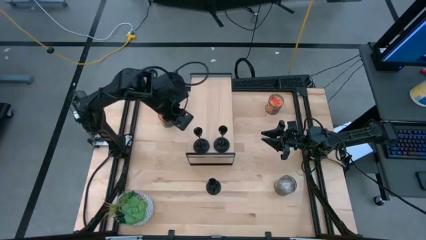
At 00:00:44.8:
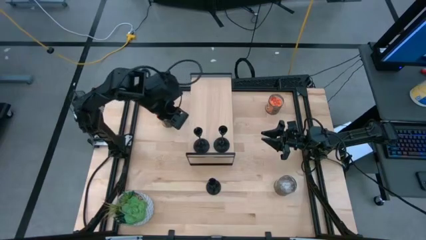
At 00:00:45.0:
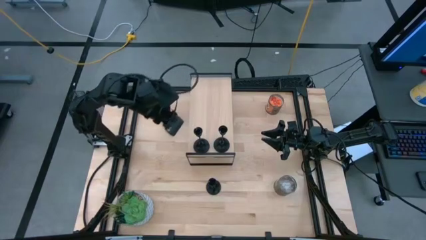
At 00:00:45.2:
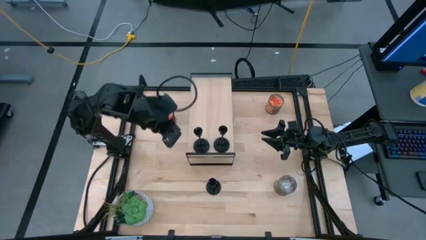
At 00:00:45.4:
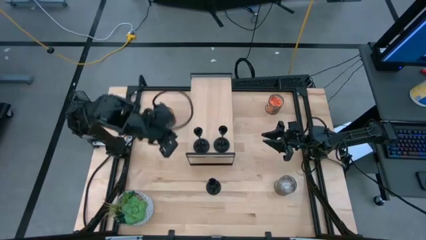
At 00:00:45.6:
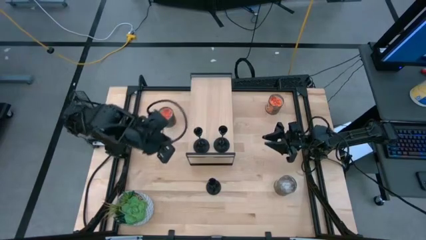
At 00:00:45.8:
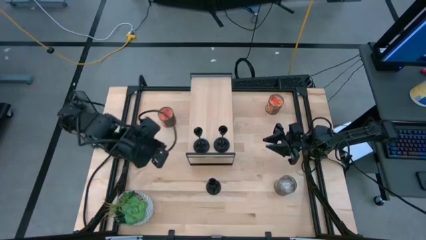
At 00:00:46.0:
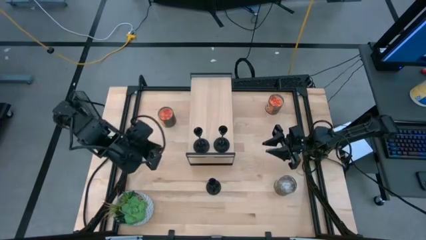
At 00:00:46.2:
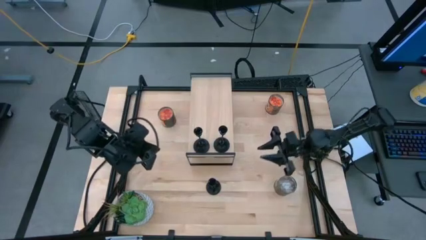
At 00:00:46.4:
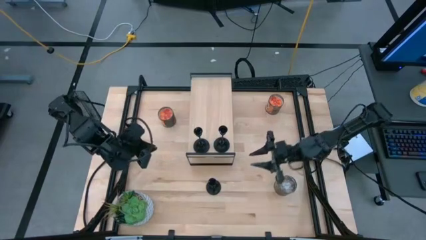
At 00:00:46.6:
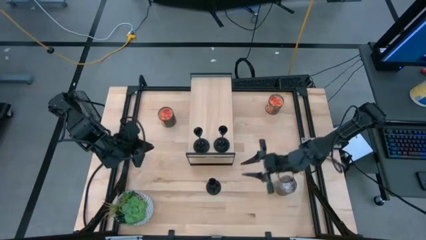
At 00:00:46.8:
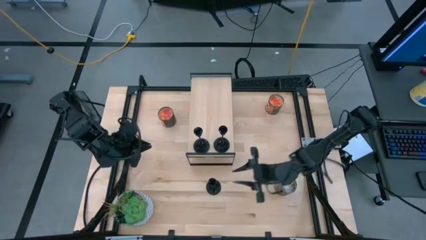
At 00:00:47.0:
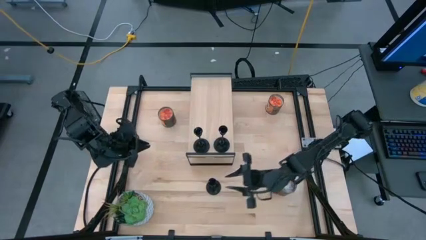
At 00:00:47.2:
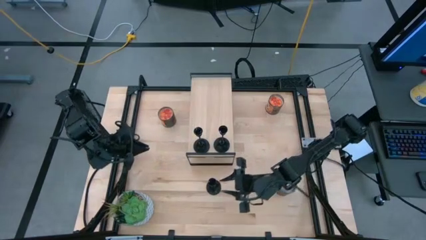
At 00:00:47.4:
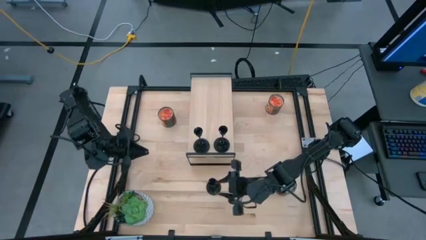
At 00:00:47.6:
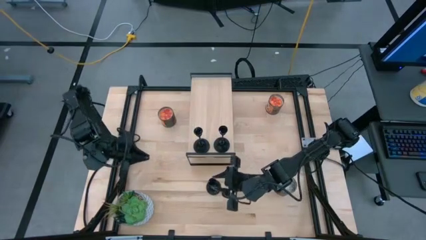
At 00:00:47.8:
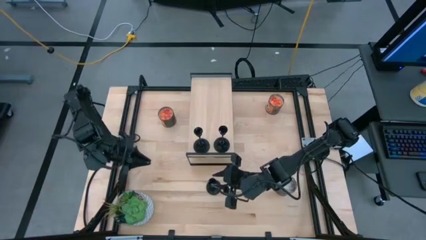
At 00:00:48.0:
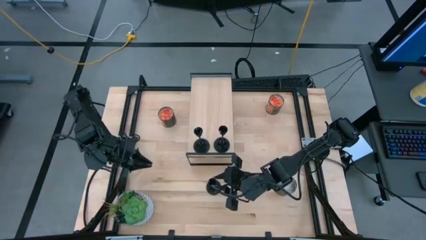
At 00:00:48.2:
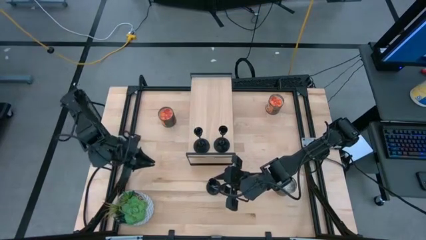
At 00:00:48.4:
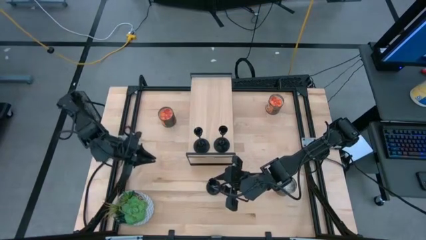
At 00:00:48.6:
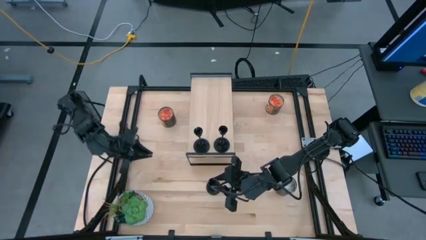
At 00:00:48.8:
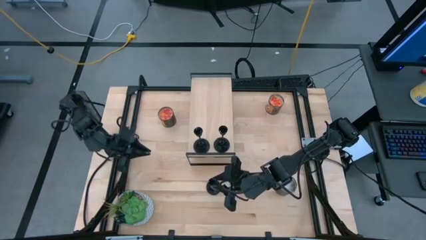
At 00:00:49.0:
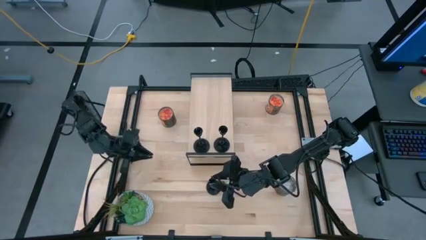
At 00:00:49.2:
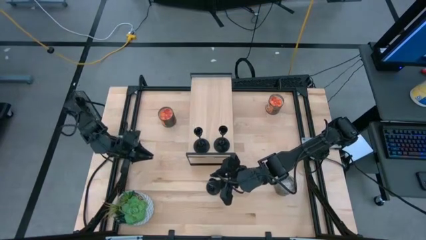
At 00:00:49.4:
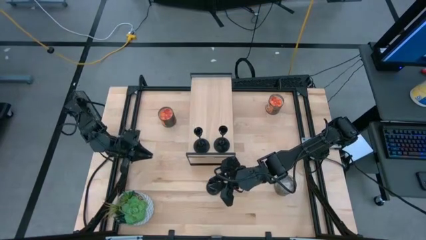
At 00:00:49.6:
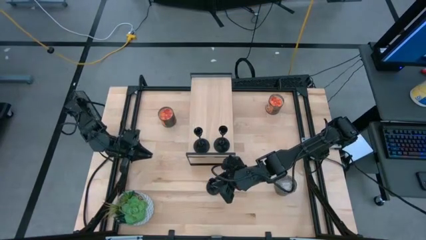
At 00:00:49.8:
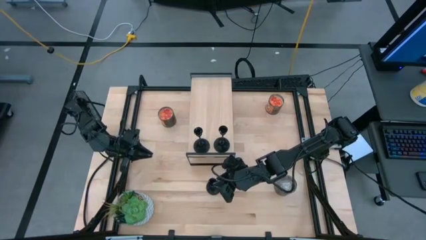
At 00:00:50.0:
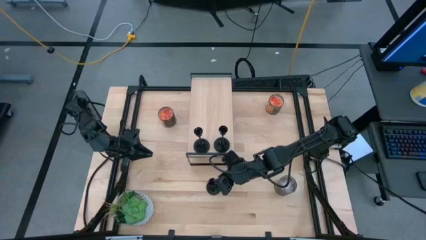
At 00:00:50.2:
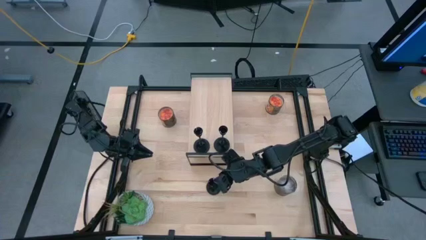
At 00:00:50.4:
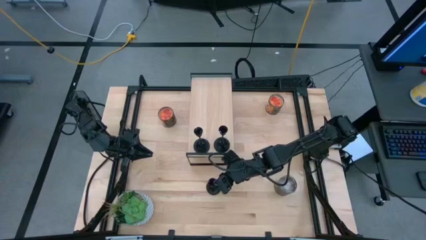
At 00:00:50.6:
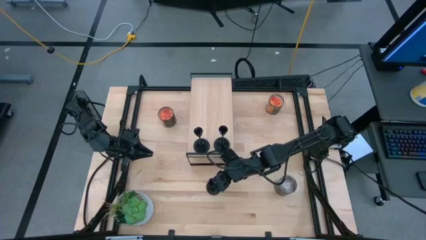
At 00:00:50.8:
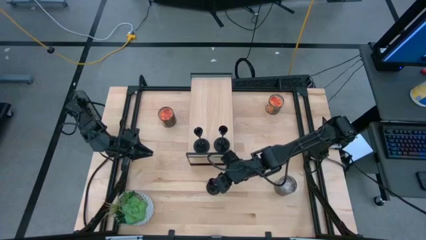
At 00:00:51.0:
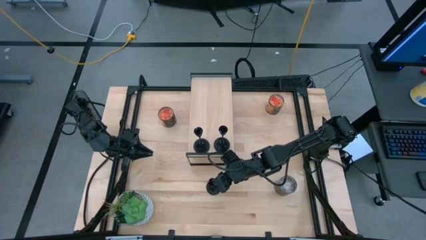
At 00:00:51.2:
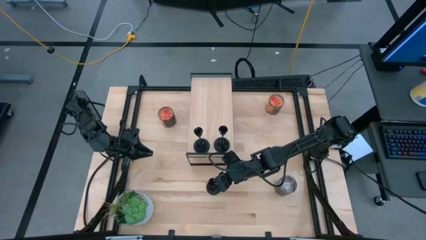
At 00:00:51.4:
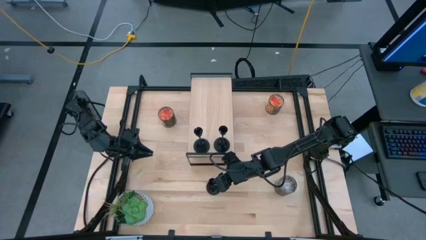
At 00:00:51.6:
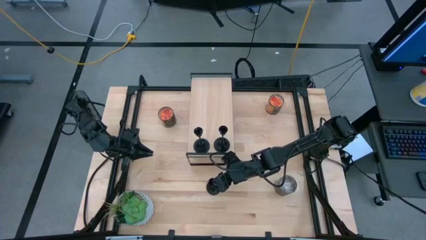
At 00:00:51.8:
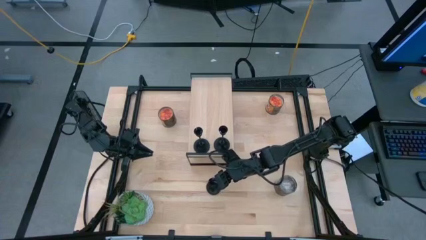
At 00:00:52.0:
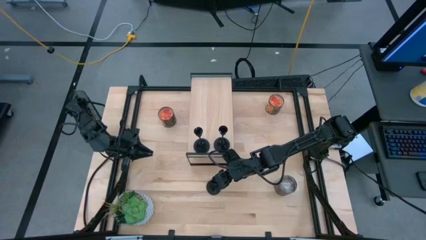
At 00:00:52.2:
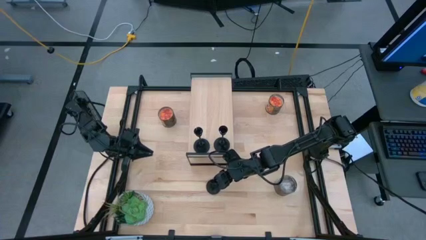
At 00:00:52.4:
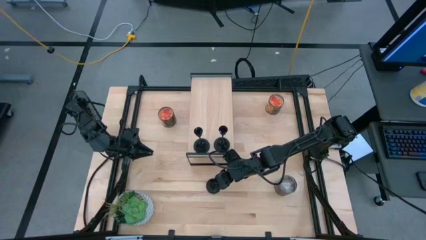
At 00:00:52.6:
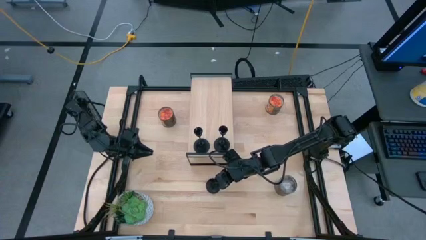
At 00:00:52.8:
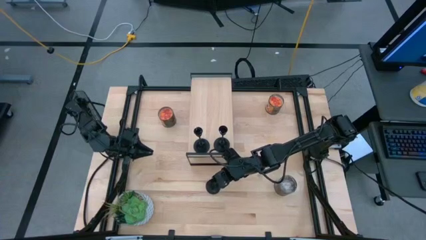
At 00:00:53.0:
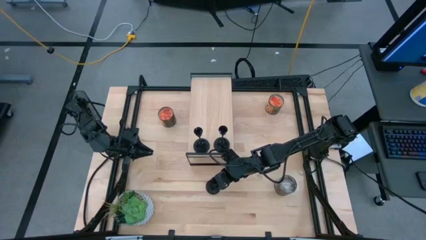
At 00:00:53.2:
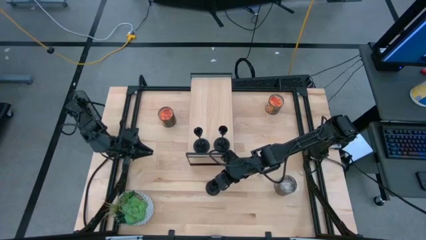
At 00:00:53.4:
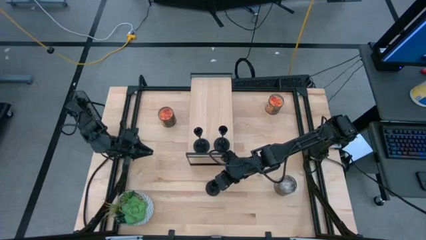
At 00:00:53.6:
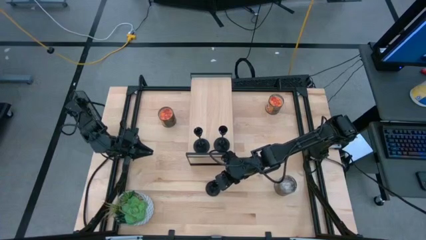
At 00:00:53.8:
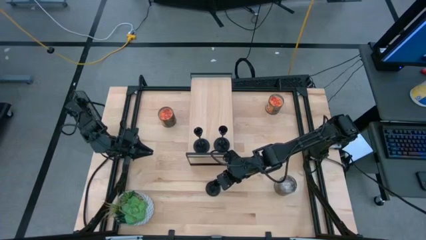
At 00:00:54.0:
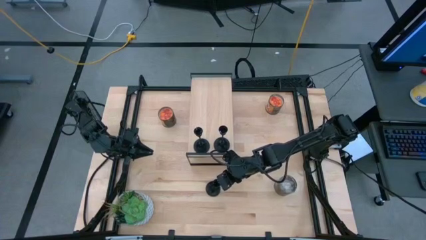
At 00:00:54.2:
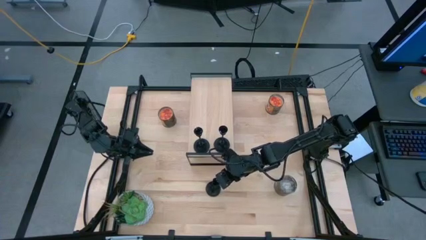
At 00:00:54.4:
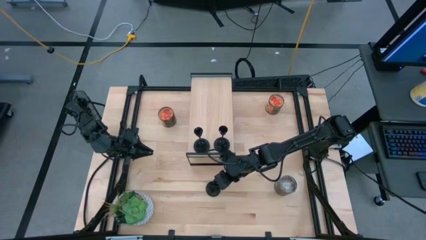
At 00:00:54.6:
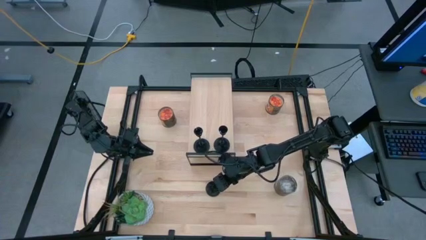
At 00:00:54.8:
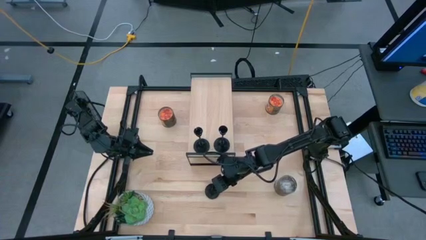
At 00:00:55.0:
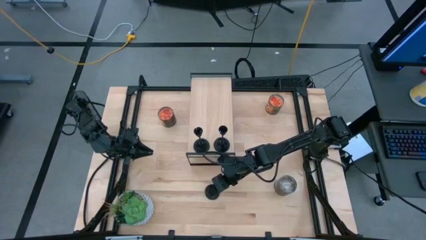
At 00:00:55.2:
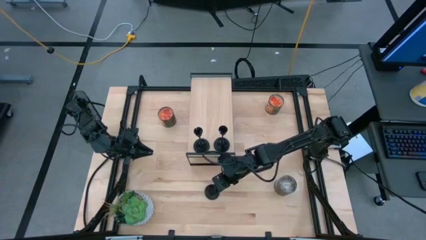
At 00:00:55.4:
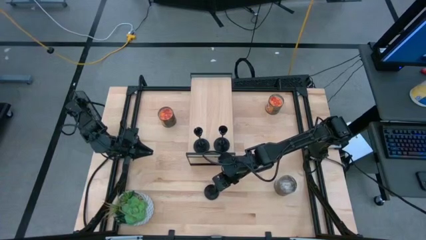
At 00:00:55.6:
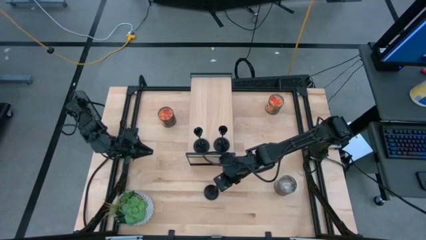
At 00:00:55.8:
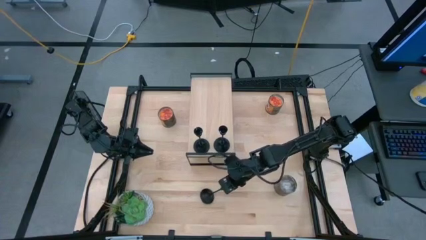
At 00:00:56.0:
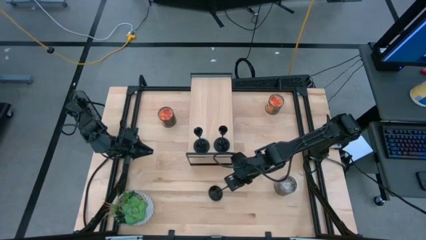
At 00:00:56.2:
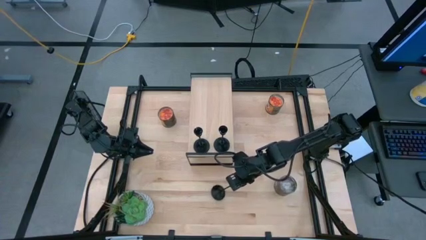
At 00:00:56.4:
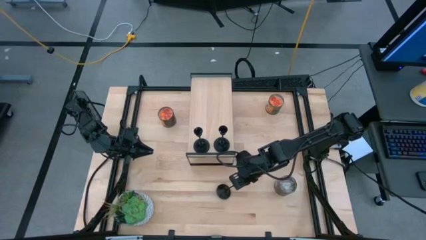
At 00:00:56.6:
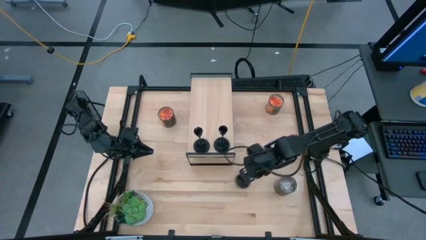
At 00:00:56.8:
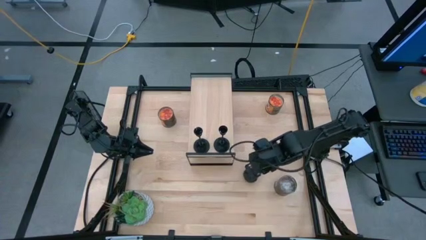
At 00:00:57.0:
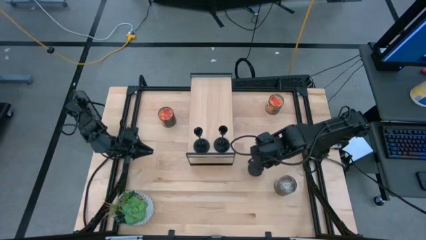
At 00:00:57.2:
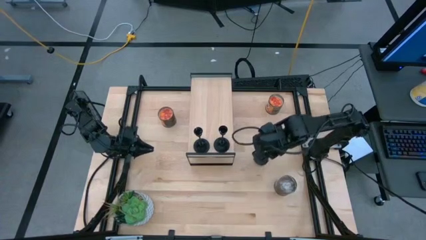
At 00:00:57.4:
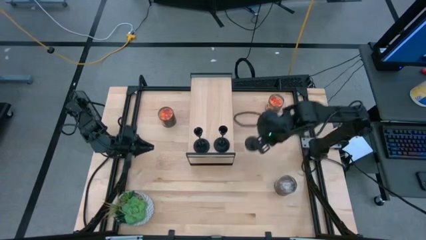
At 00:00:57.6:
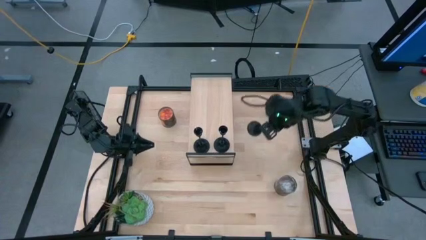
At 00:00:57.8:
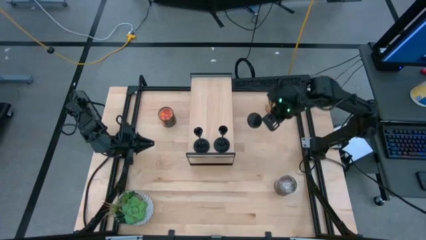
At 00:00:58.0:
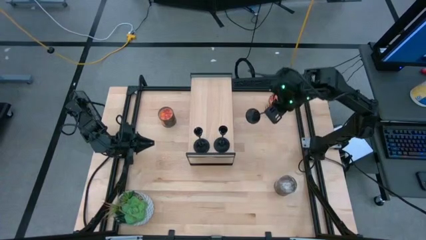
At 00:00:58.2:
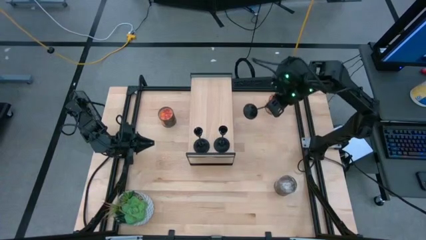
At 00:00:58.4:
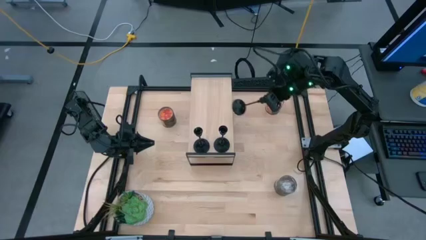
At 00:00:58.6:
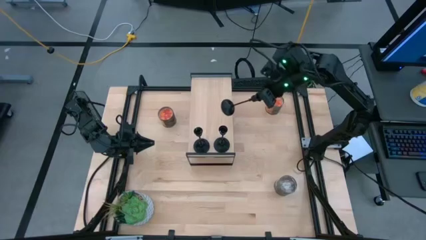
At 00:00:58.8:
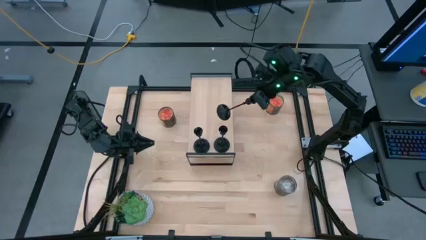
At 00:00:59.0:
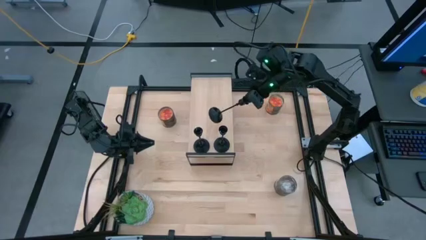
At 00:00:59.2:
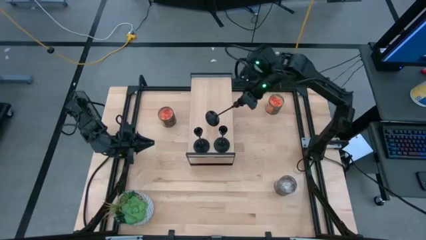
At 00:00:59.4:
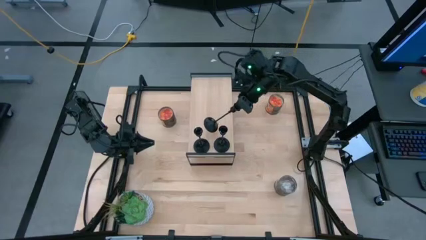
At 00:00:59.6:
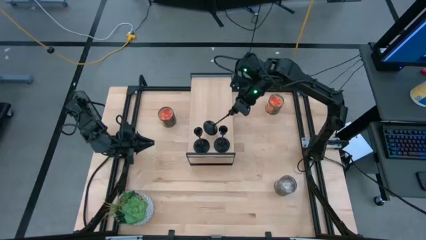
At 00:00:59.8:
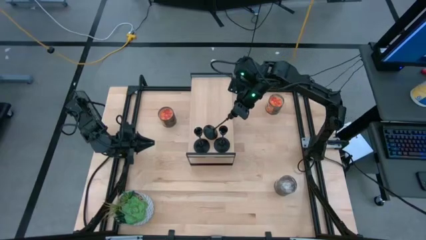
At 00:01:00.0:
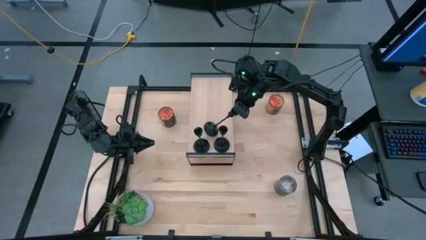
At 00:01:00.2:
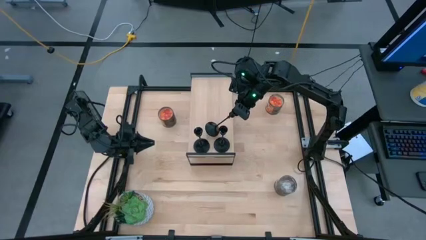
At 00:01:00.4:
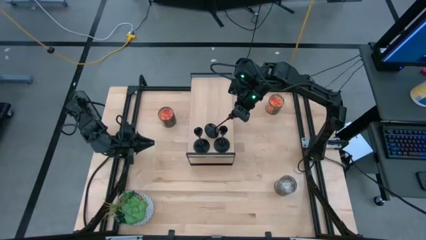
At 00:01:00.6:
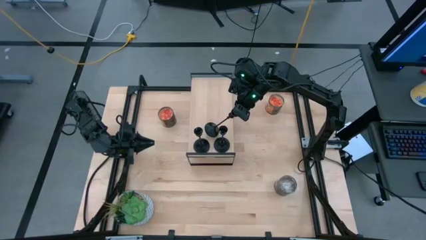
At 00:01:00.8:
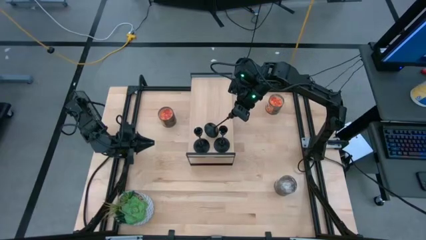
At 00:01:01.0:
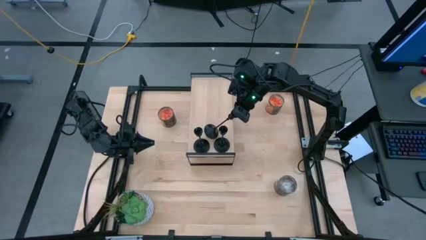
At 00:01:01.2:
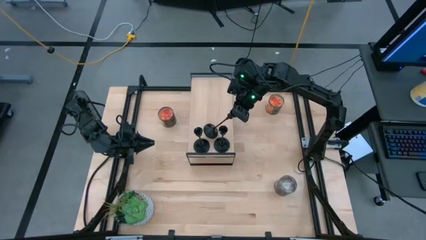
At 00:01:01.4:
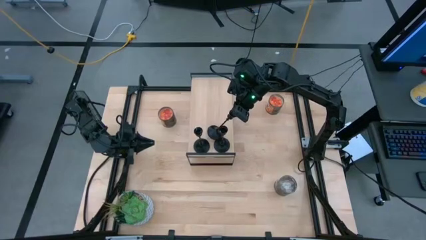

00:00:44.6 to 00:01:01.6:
Task: Pick & Place candle stick holders
Put the black candle holder on the shelf
